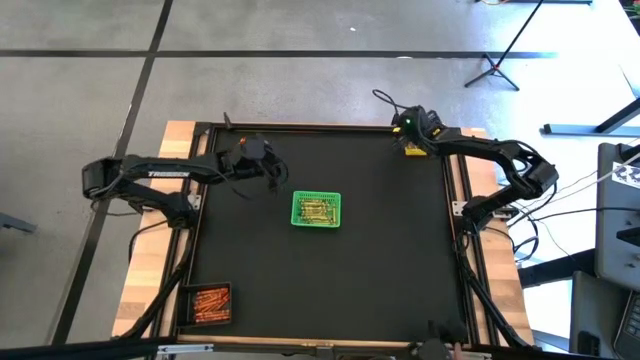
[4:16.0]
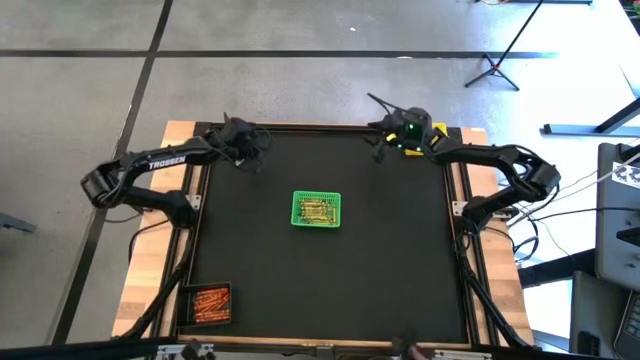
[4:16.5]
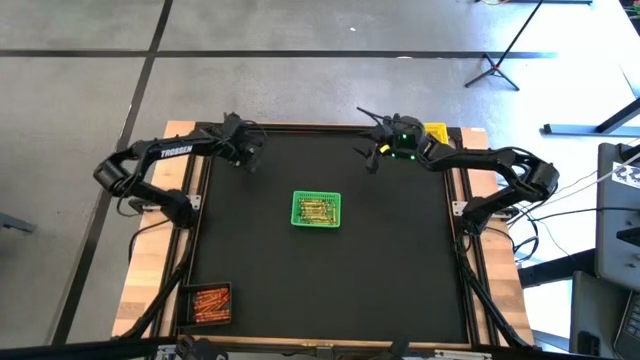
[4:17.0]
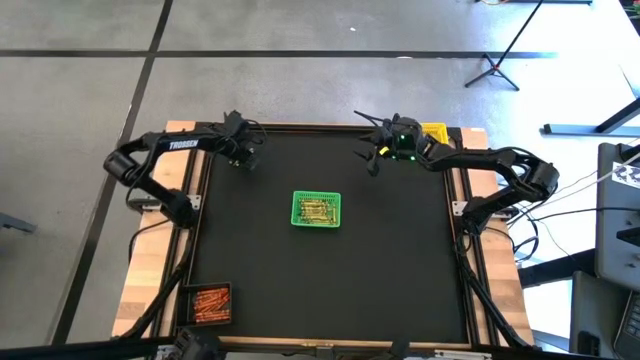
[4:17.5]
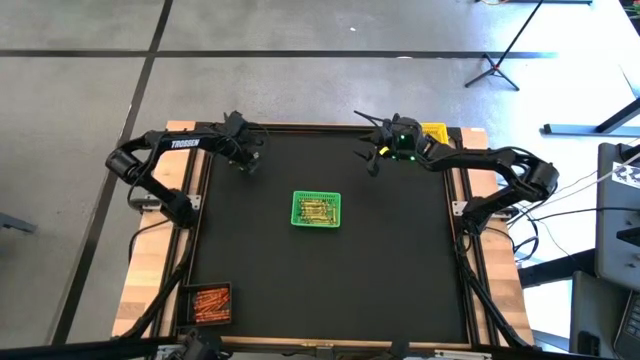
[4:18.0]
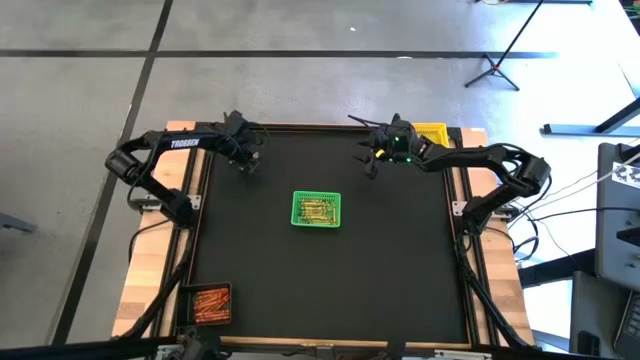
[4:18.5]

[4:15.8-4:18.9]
Task: Sort crayons
Put the green crayon into the green bin

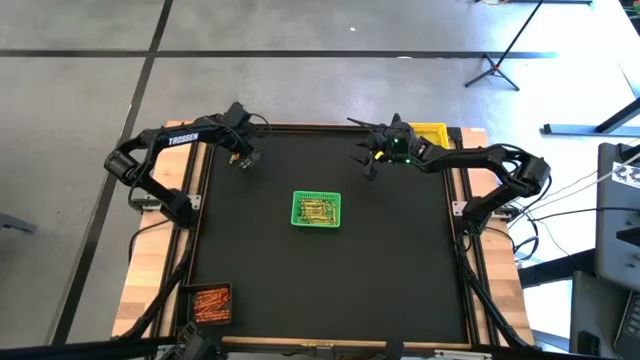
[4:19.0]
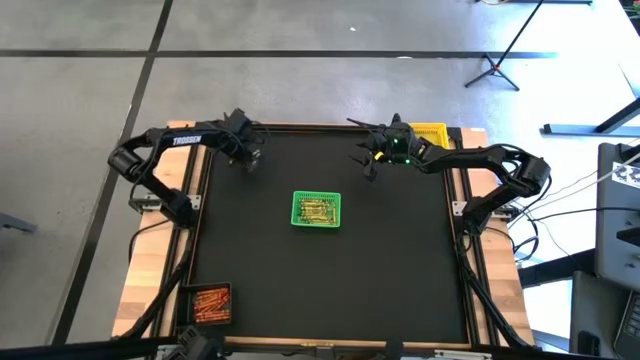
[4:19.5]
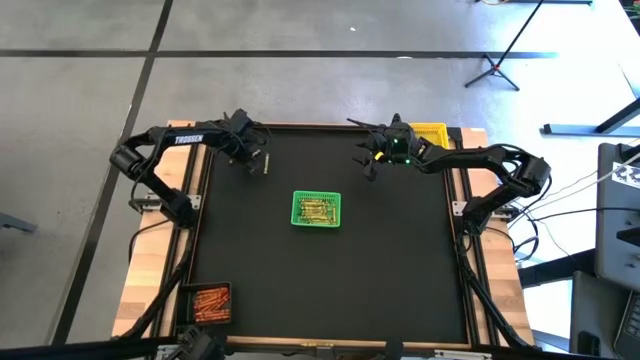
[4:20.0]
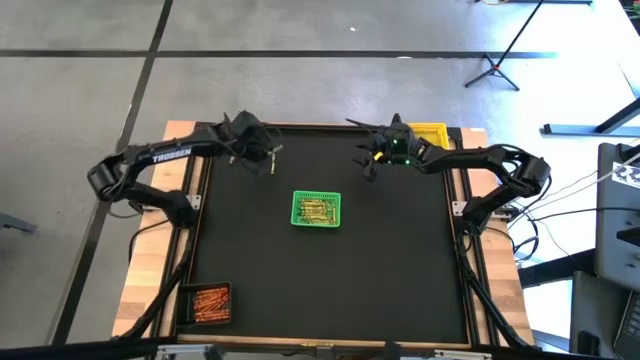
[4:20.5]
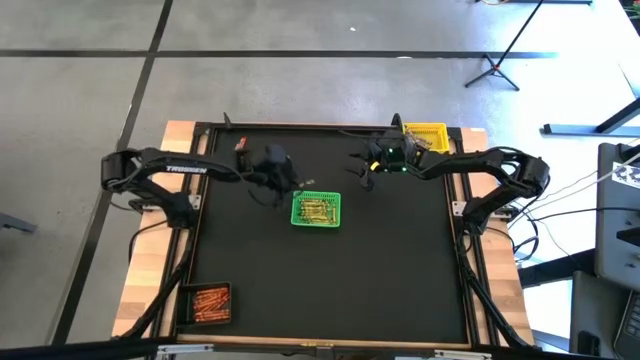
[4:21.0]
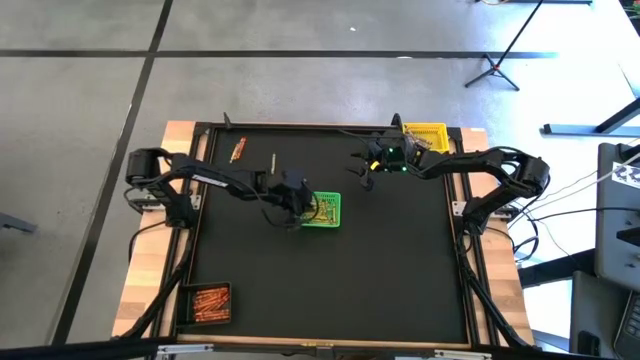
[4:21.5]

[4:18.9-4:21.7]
Put the green crayon into the green bin

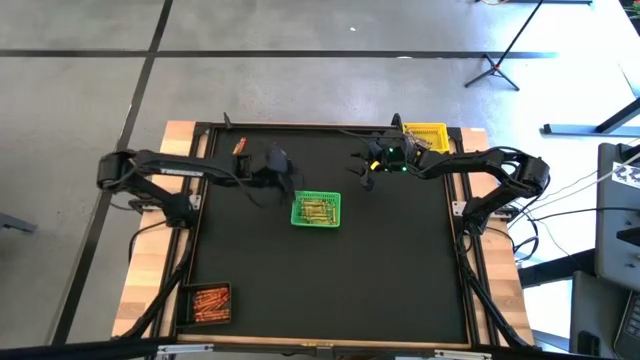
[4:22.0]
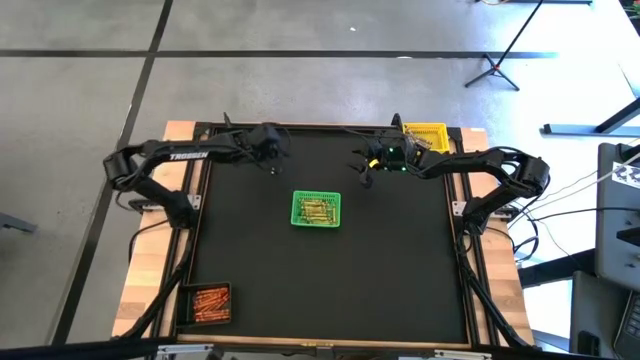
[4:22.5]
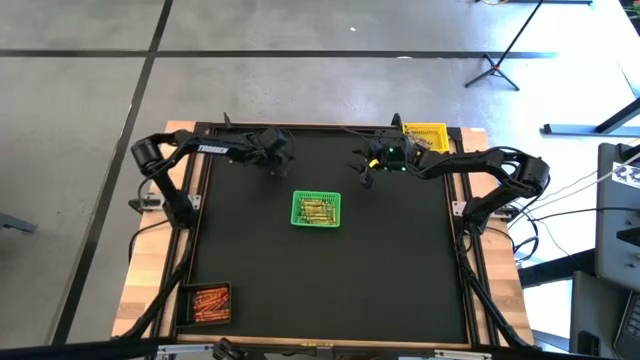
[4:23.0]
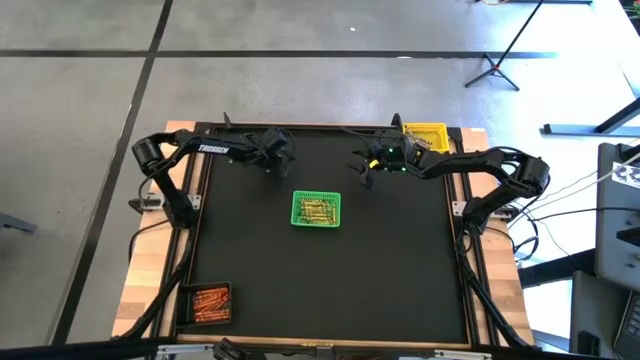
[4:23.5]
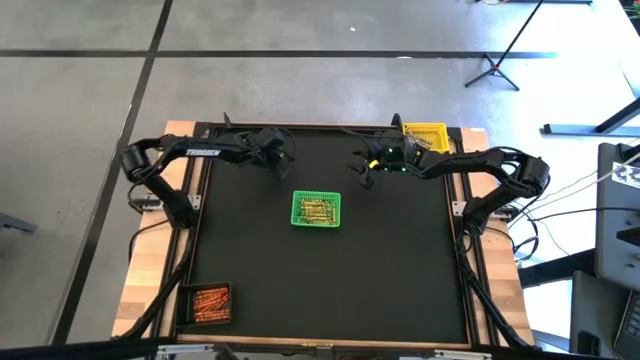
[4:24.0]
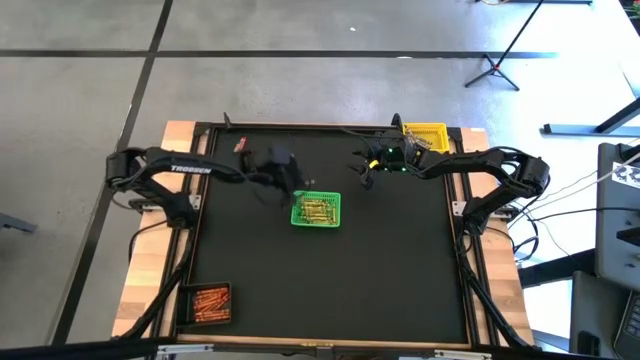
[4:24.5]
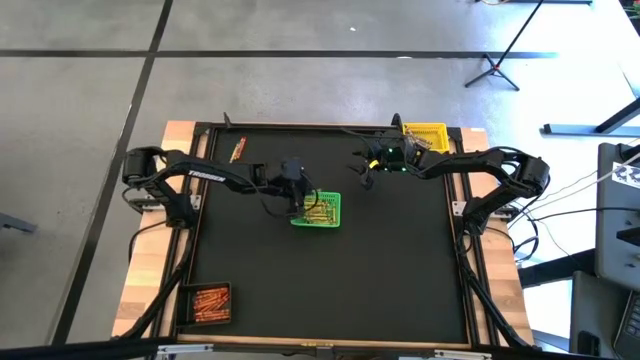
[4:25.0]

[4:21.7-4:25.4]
Put the green crayon into the green bin

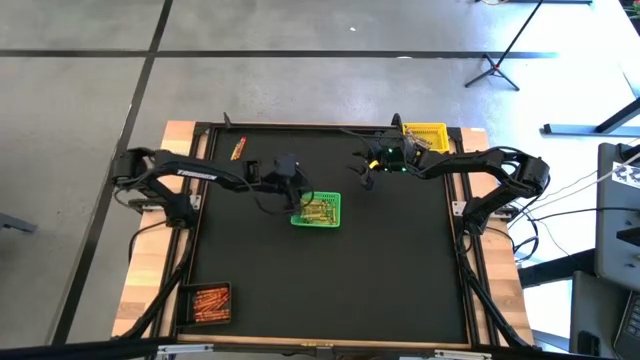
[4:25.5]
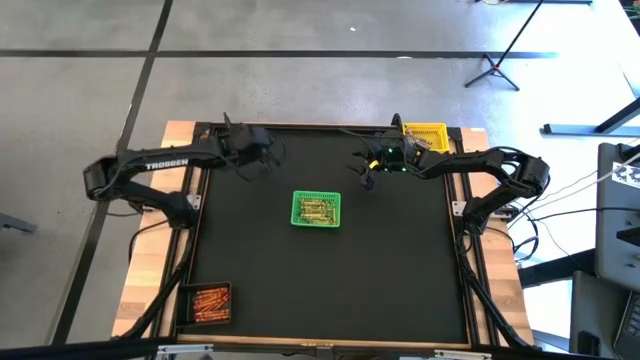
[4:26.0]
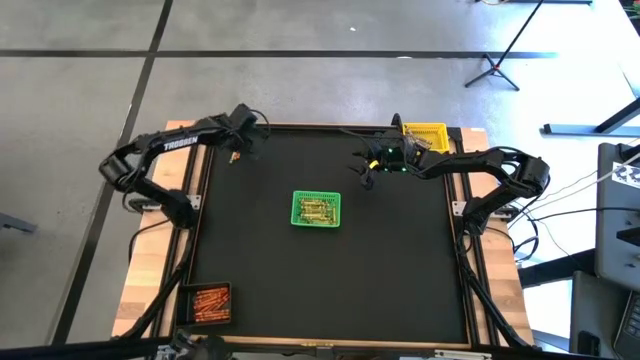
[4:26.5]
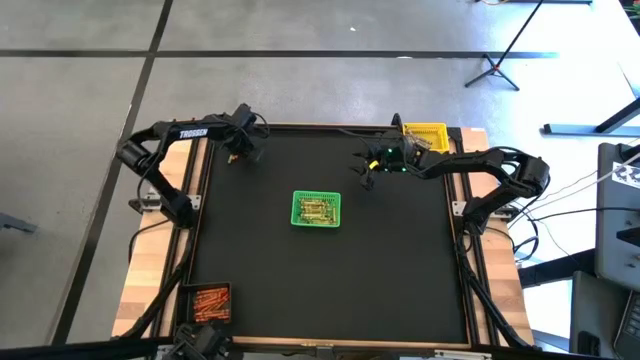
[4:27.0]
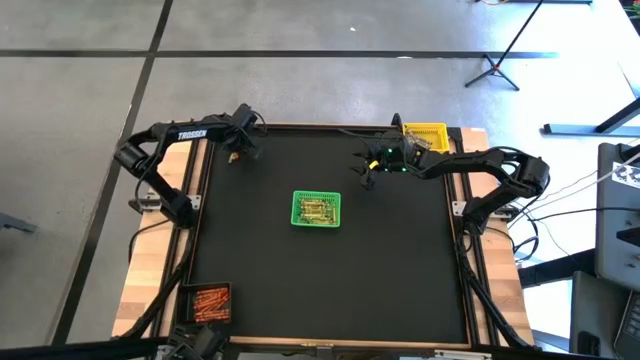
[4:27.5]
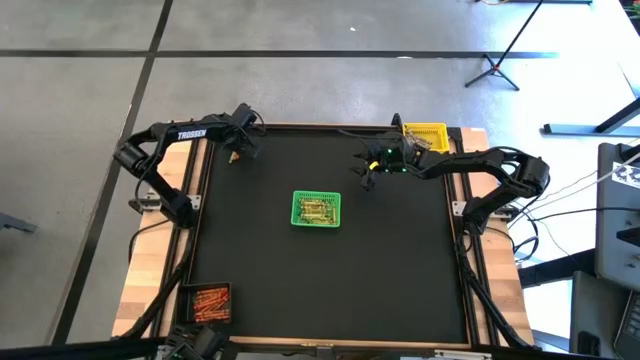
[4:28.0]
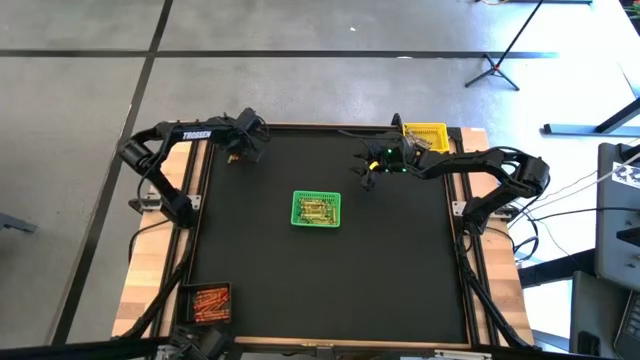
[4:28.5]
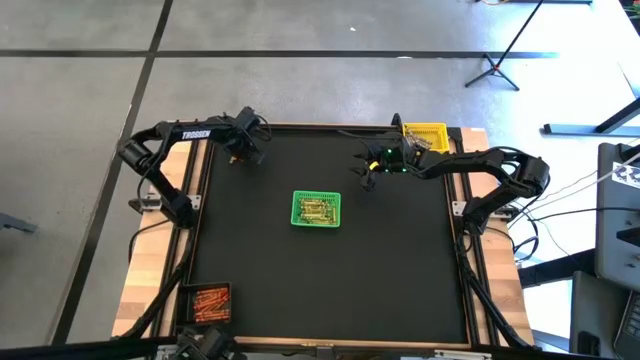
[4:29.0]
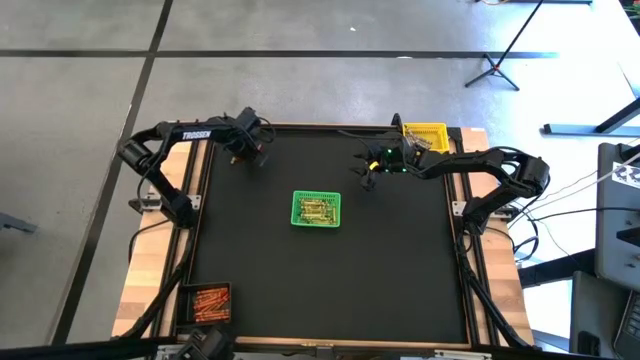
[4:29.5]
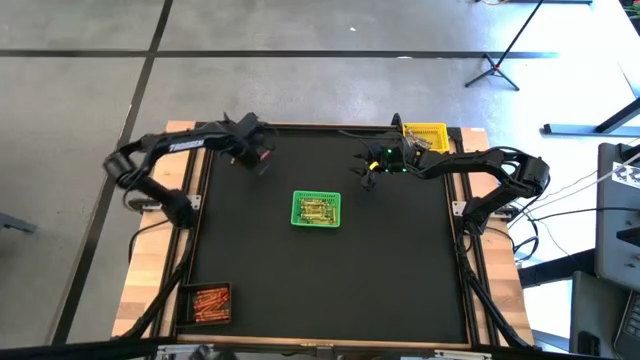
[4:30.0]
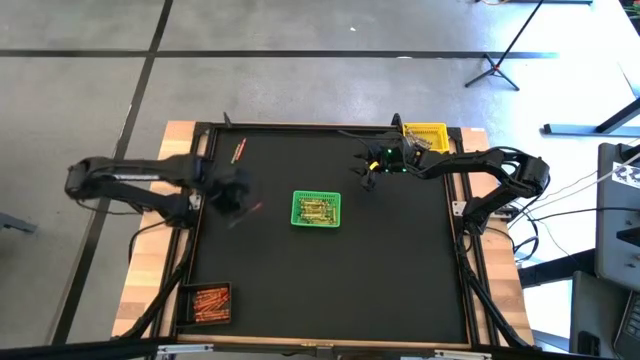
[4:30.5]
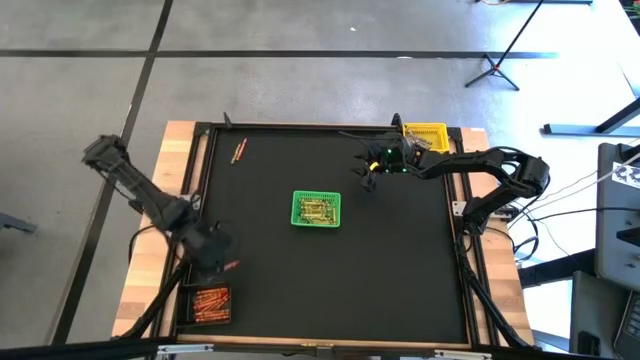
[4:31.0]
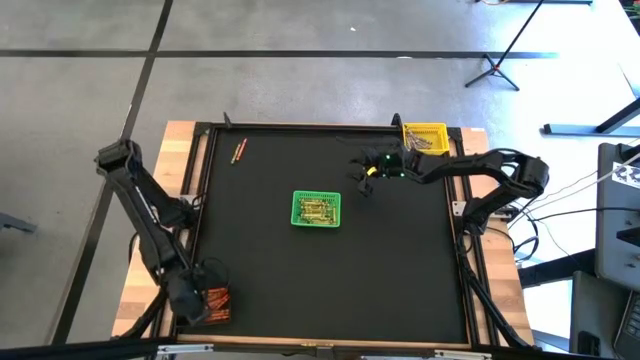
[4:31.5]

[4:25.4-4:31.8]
Put the orange crayon into the black bin

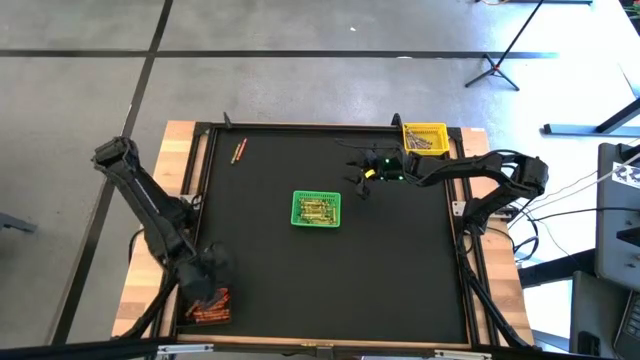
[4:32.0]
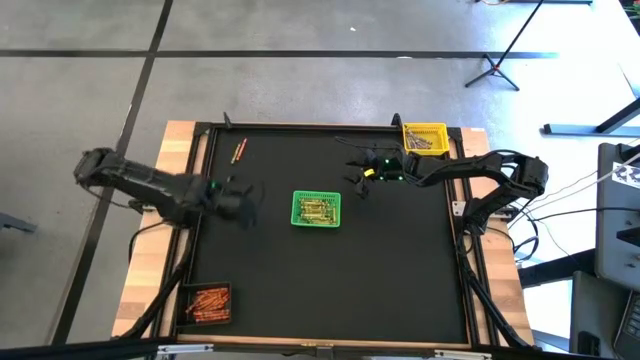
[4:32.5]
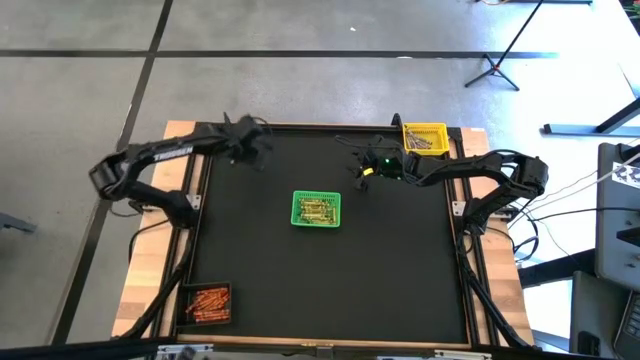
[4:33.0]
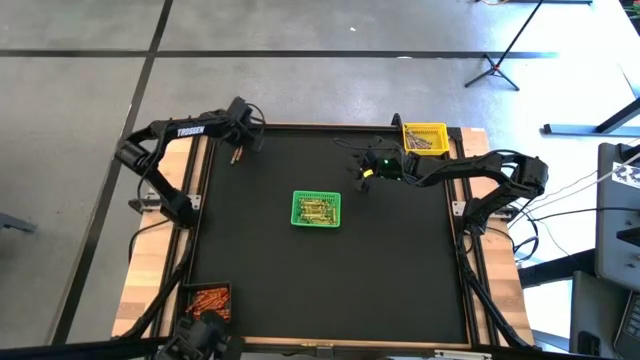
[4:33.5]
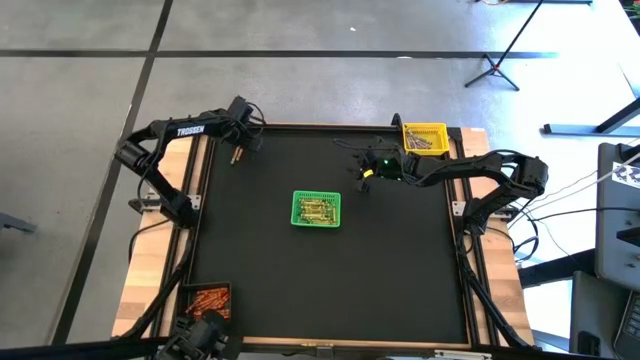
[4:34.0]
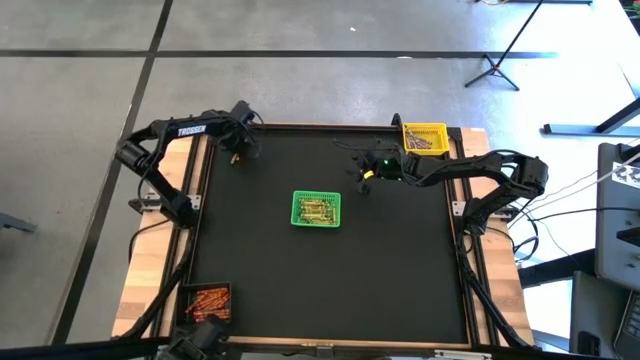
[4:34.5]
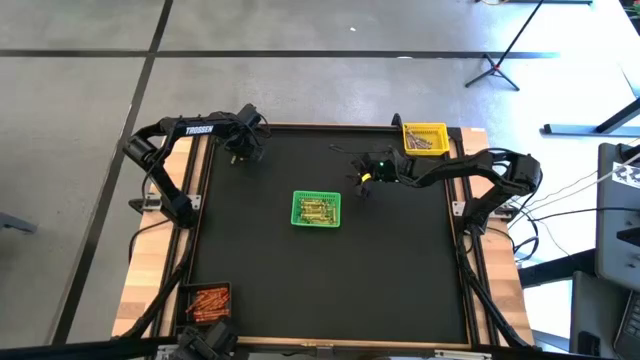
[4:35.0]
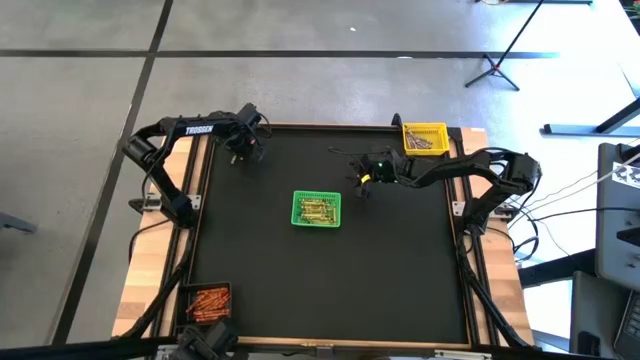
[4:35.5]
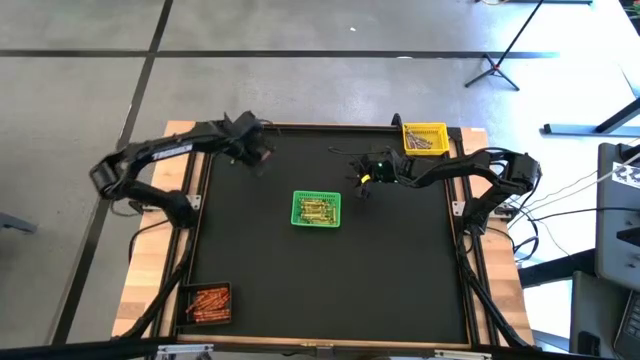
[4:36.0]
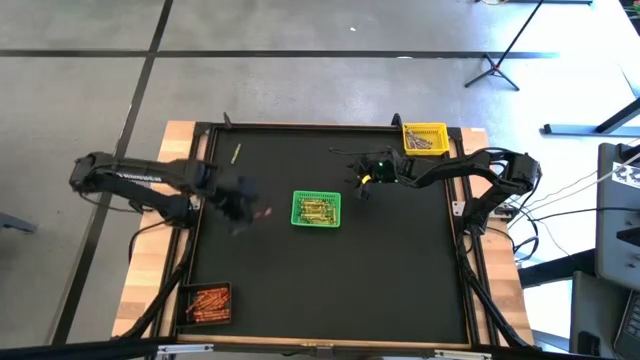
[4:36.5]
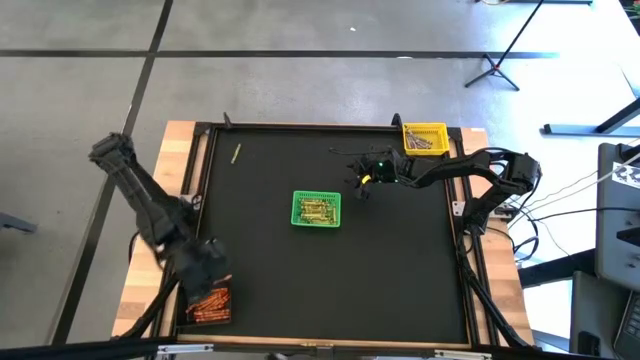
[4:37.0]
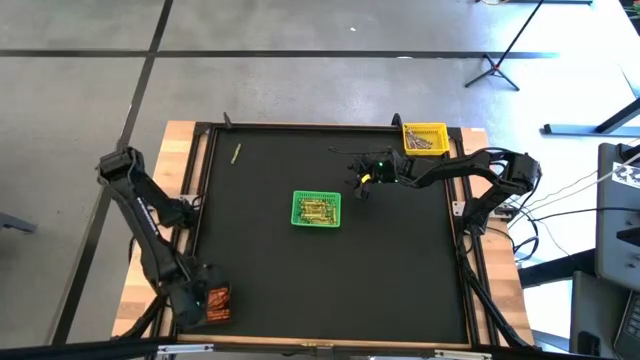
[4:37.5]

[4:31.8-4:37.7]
Put the orange crayon into the black bin
